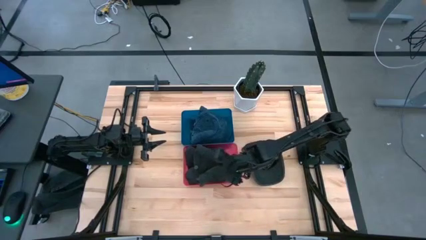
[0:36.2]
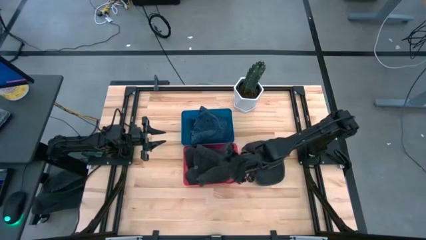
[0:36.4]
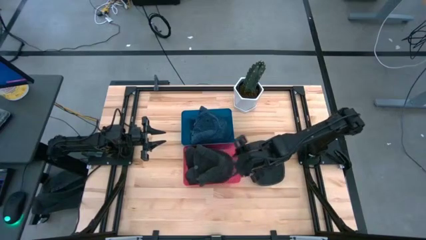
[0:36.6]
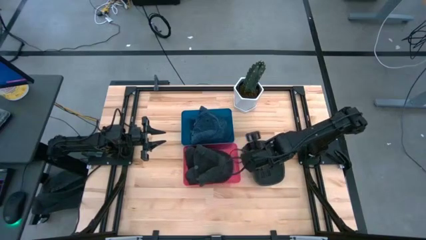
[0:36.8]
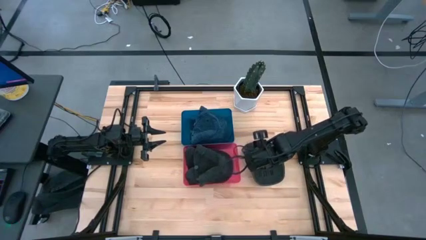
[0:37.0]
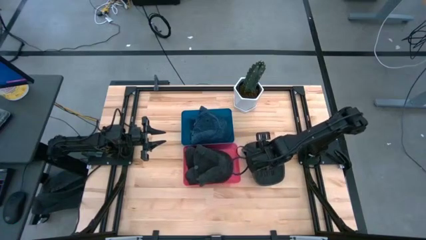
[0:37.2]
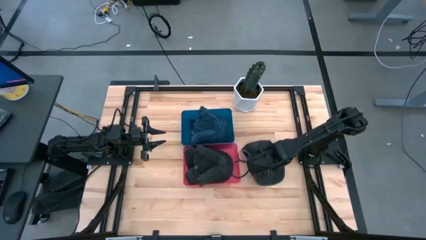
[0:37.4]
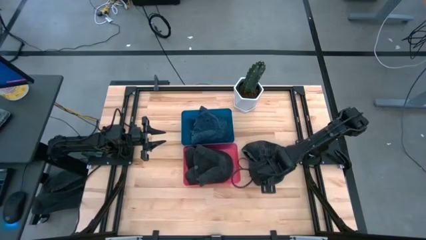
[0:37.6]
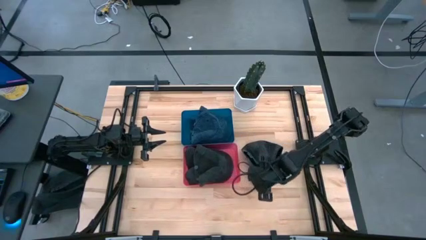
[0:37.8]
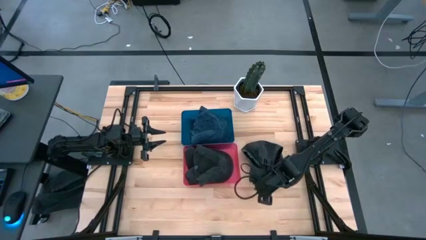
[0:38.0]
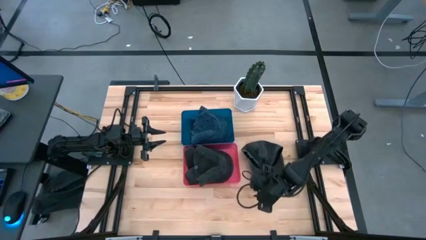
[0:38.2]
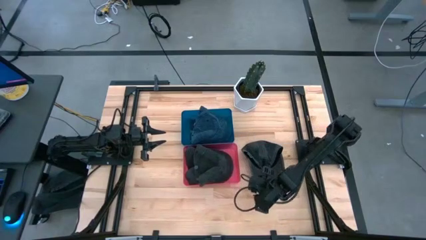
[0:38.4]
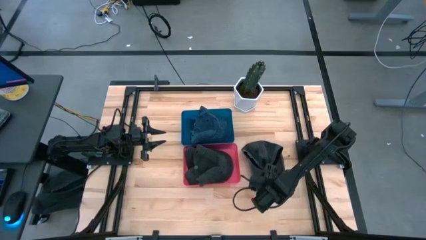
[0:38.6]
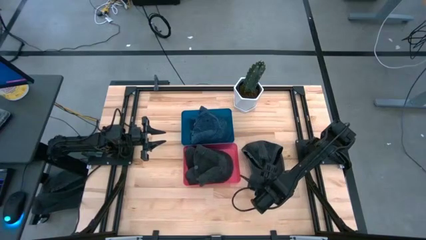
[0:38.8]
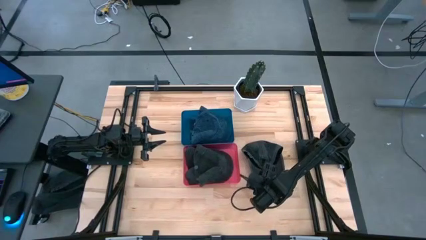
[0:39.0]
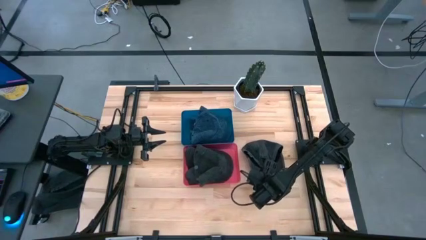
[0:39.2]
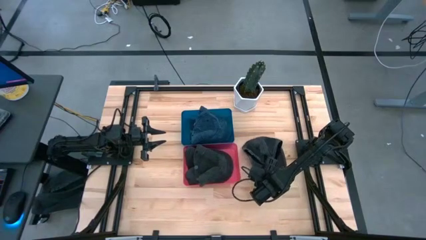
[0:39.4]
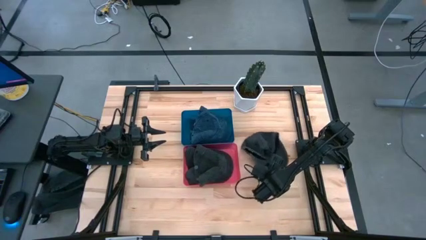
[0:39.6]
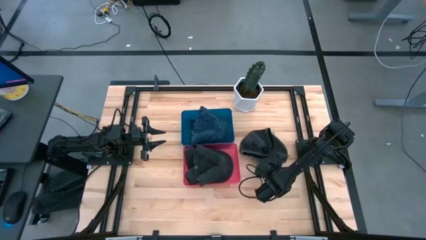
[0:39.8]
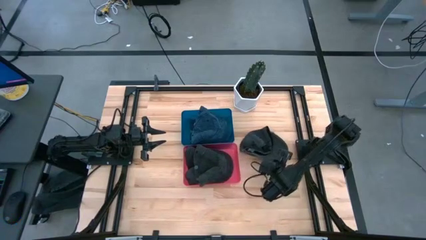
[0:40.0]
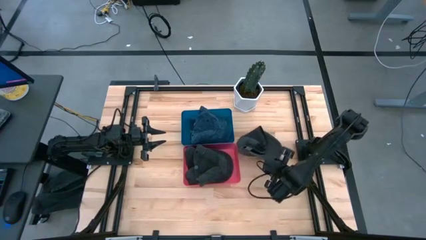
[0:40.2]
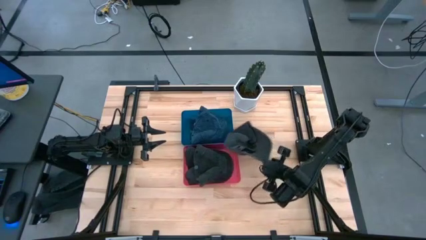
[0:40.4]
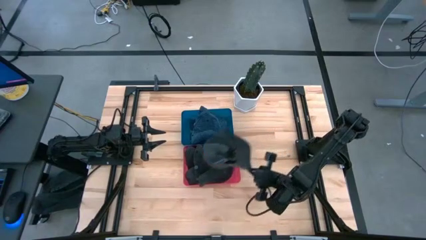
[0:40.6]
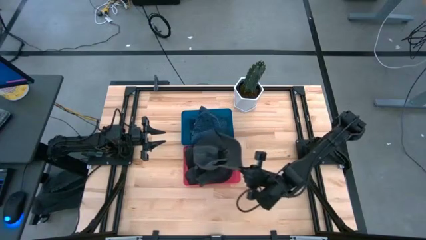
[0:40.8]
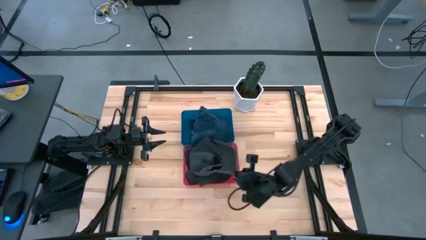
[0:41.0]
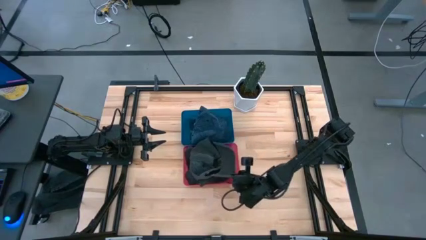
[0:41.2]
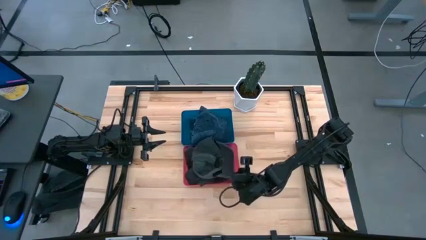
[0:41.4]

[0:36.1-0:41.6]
Task: Pick & Place hat
Put the black cap into the pink bin

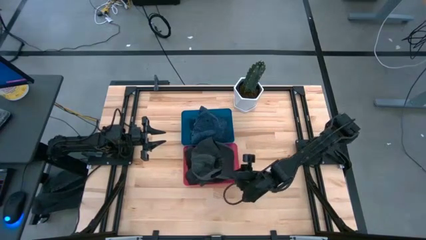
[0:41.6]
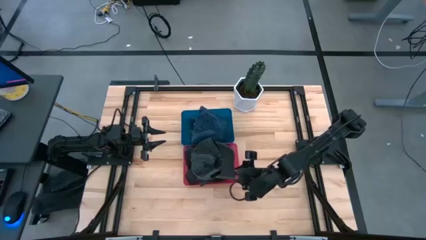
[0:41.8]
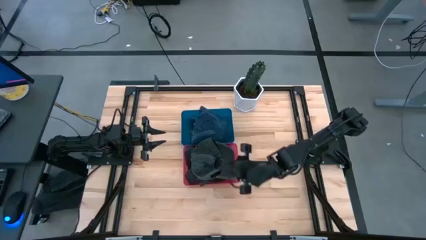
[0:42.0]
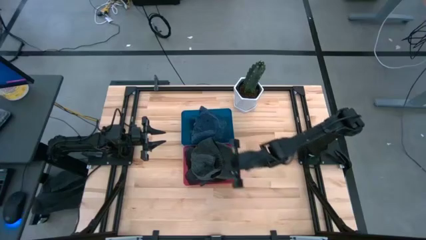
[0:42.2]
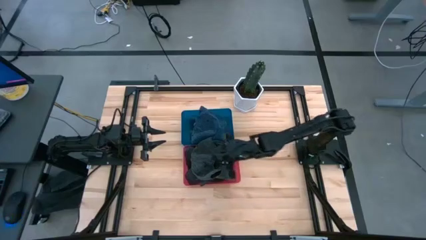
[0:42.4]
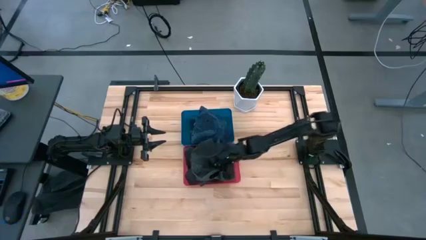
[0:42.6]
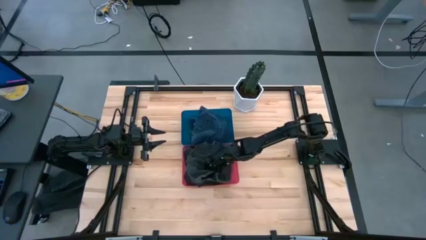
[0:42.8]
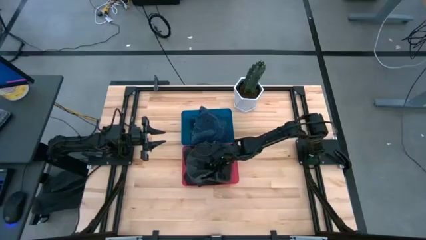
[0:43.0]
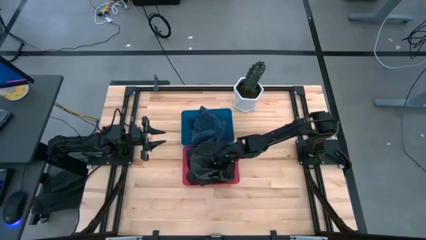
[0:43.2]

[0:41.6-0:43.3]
Adjust the black cap into the pink bin

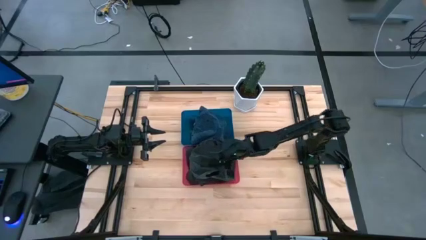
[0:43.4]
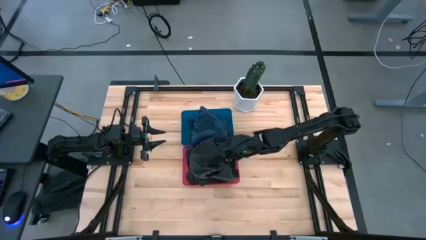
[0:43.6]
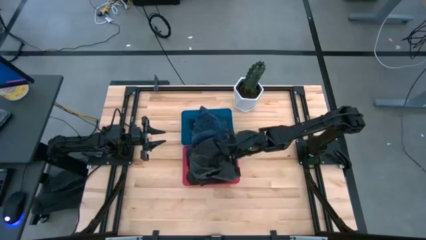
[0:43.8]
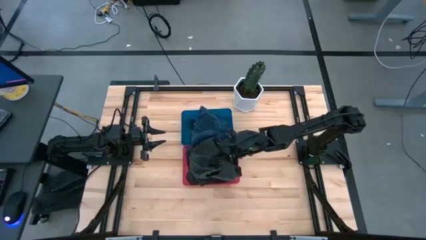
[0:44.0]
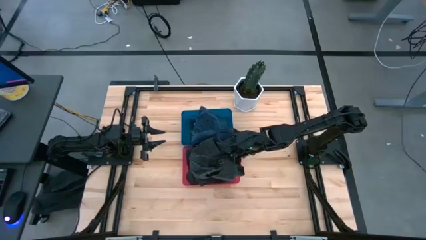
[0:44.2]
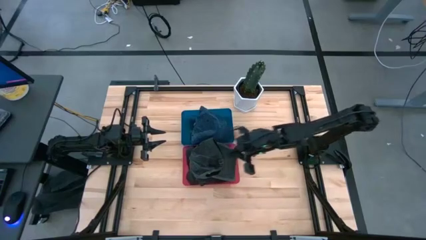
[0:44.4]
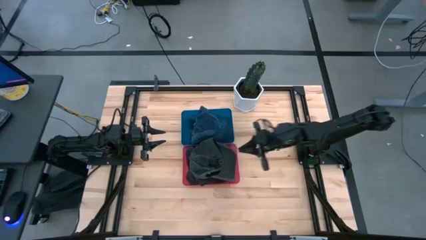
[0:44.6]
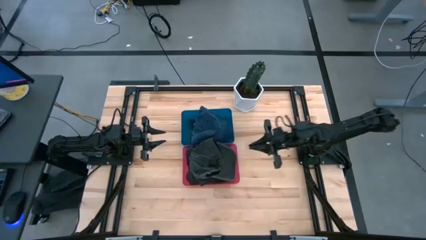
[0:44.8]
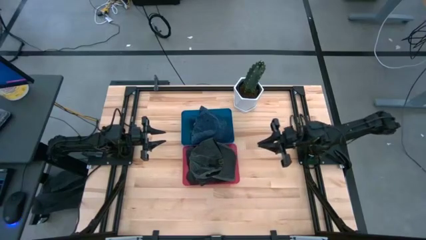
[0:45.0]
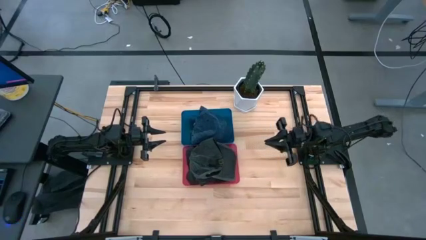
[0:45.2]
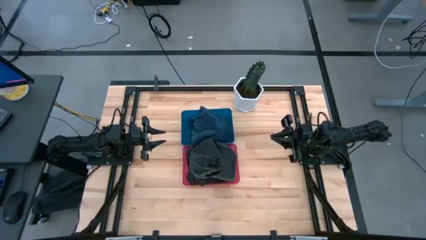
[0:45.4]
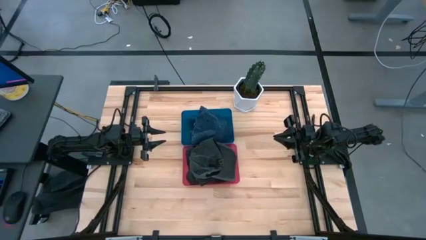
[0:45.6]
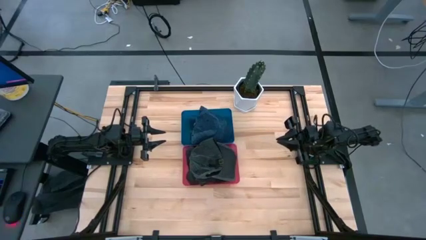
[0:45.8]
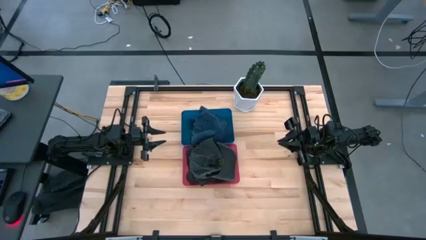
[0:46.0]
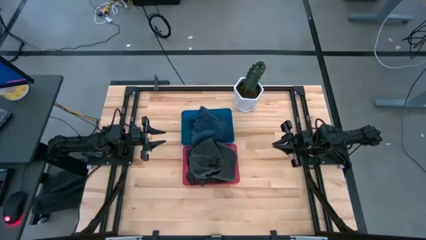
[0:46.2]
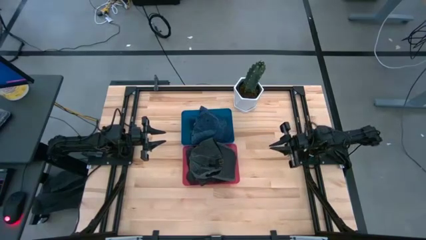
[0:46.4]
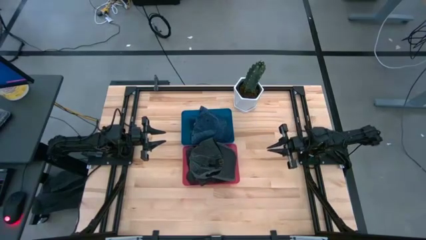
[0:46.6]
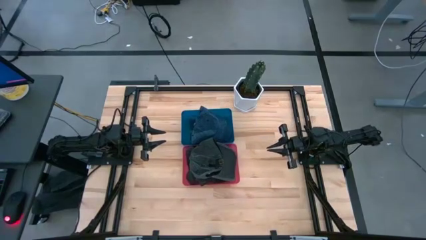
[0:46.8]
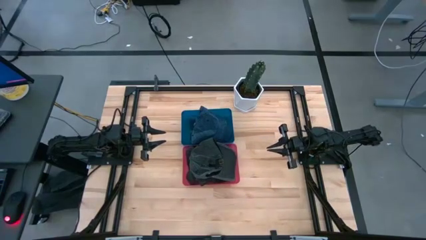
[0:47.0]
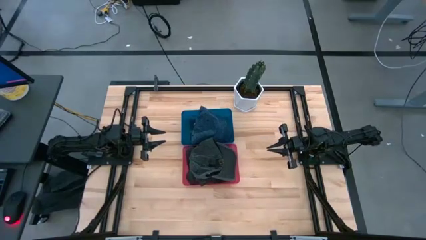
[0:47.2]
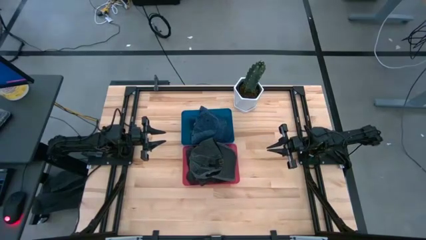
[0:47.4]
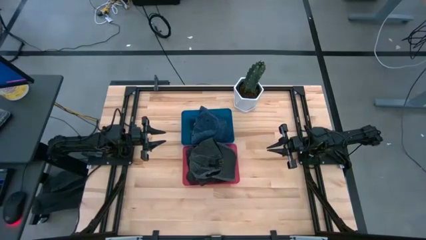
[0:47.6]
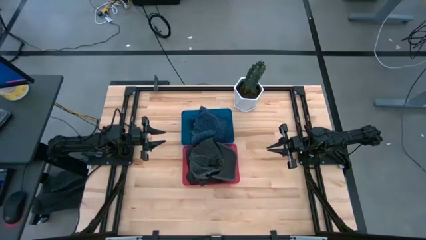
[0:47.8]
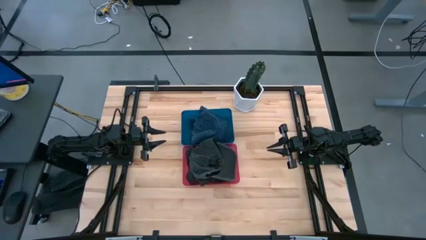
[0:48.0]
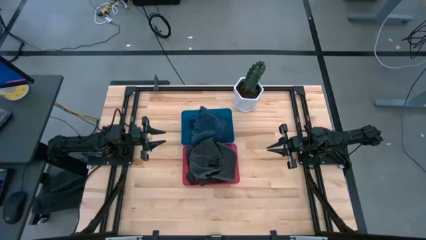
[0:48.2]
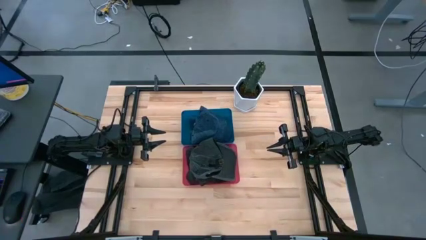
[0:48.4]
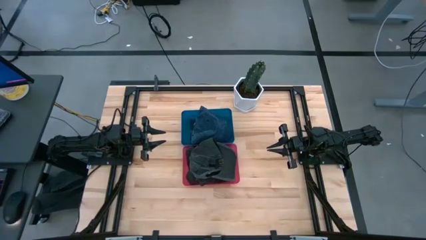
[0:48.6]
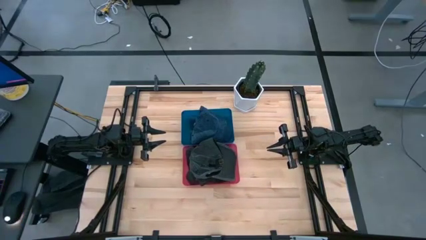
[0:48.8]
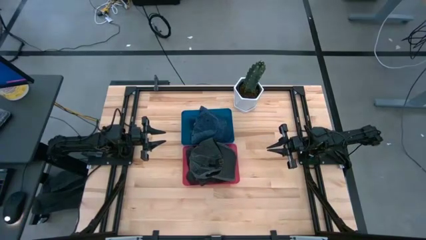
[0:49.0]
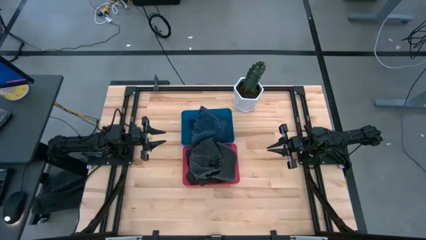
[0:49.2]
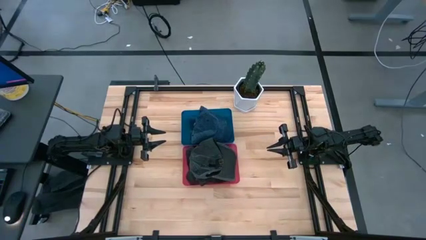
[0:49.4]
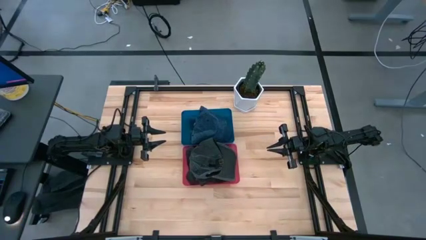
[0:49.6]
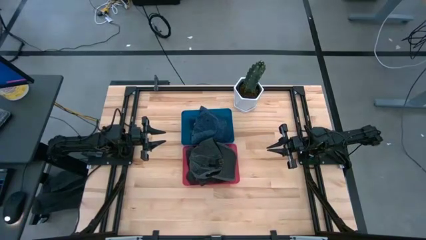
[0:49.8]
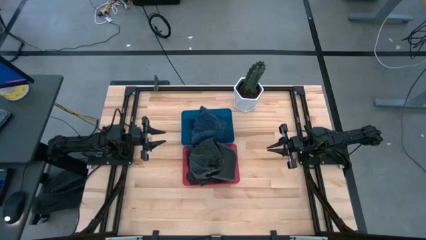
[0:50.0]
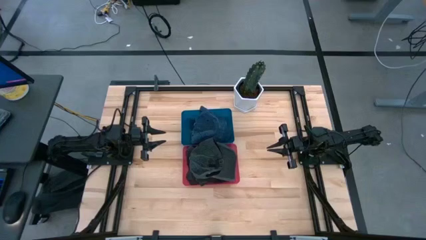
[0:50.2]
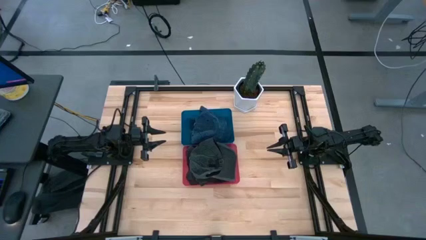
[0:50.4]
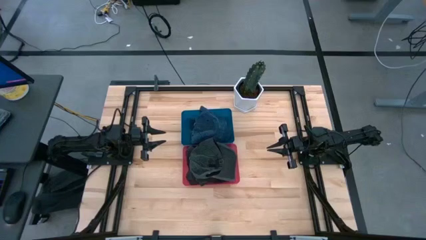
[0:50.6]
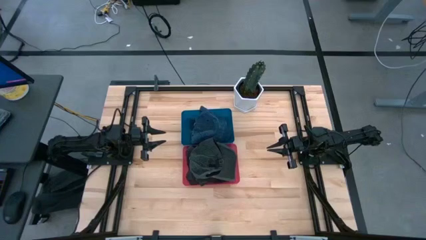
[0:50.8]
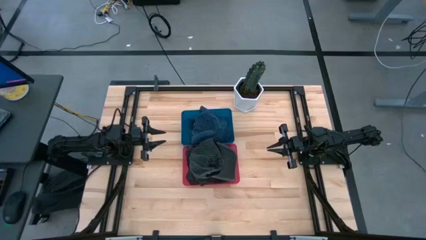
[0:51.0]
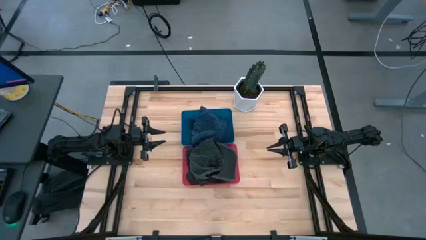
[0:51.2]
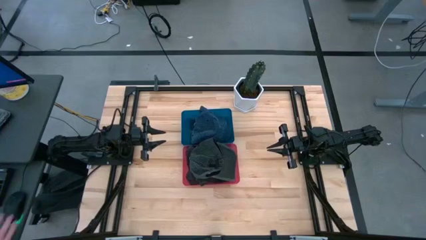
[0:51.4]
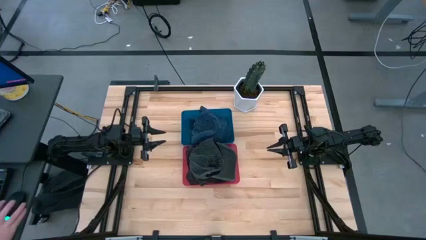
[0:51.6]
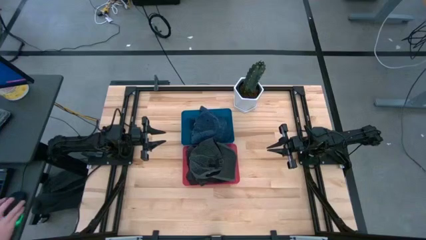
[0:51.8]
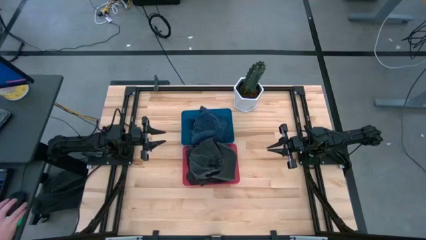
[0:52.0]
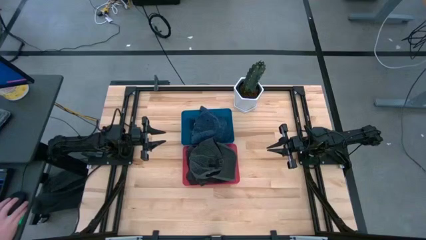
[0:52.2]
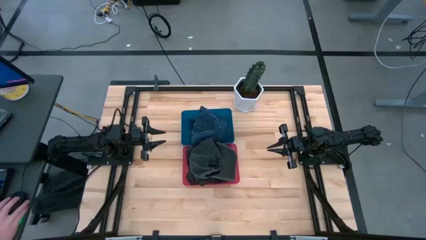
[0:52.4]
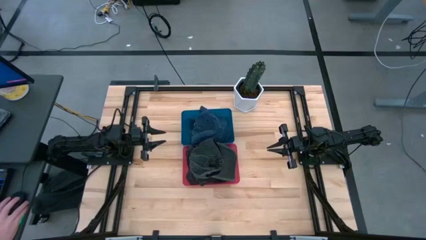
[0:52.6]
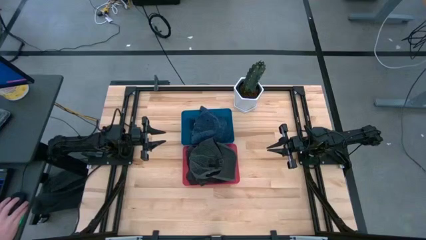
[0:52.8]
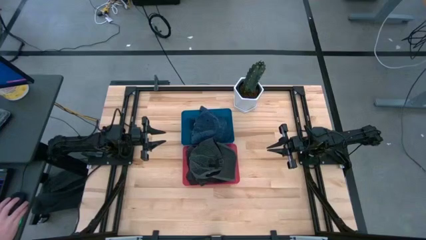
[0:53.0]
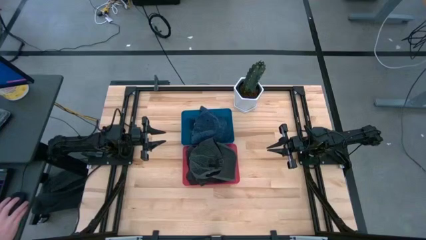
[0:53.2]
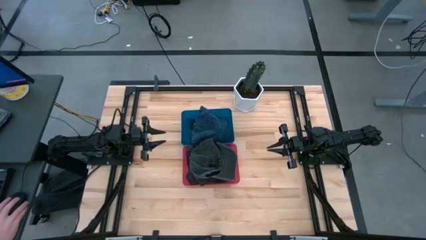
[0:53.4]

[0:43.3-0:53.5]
Return to Home Position
